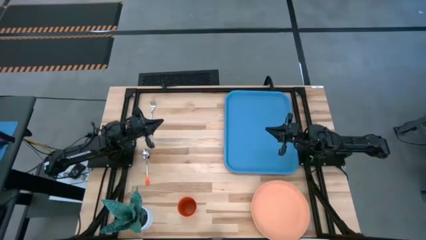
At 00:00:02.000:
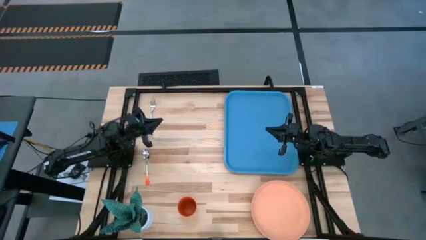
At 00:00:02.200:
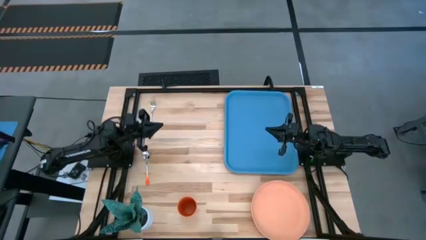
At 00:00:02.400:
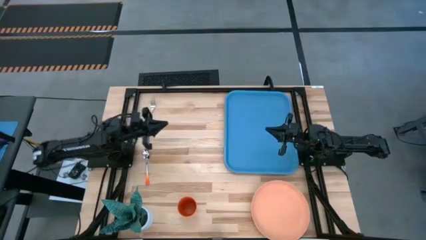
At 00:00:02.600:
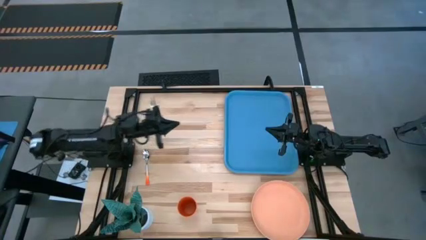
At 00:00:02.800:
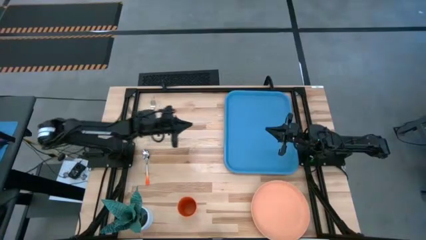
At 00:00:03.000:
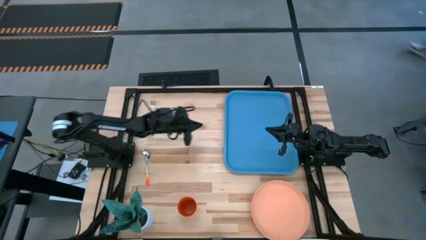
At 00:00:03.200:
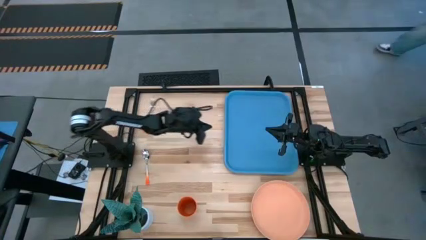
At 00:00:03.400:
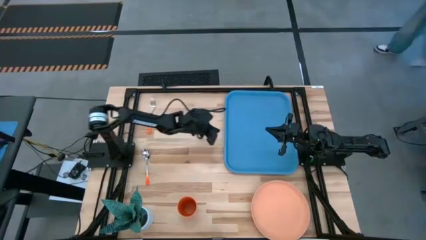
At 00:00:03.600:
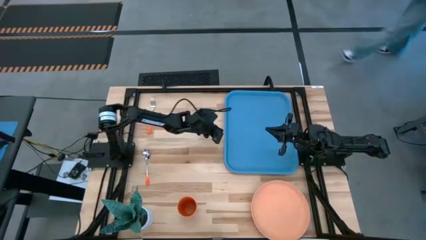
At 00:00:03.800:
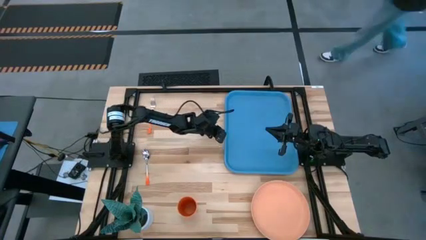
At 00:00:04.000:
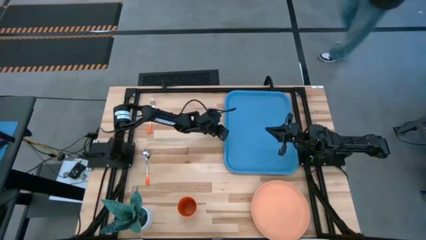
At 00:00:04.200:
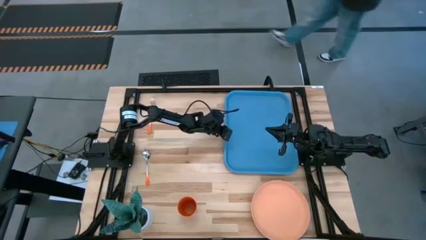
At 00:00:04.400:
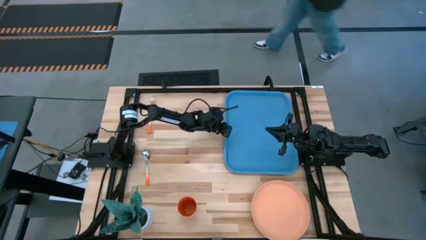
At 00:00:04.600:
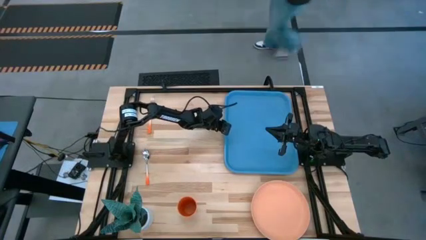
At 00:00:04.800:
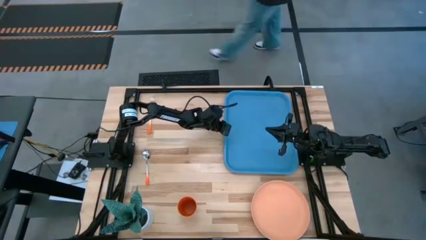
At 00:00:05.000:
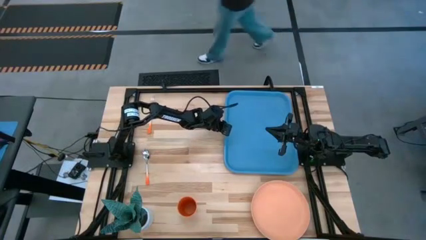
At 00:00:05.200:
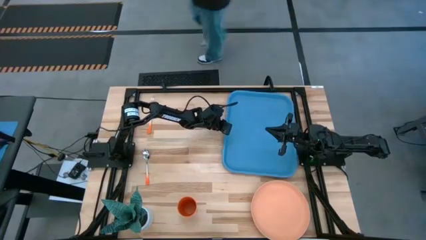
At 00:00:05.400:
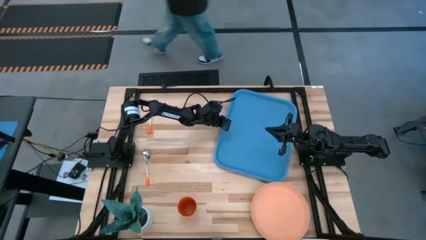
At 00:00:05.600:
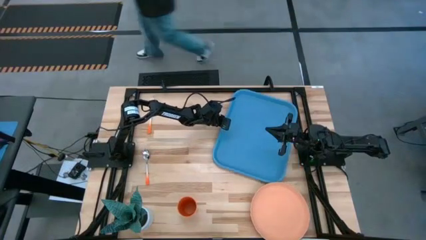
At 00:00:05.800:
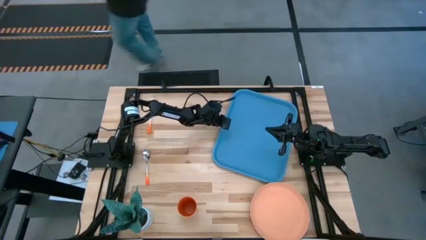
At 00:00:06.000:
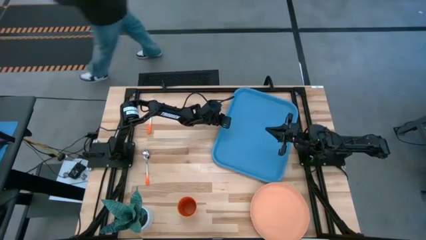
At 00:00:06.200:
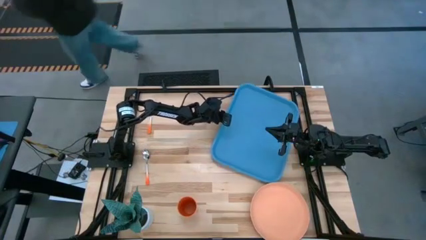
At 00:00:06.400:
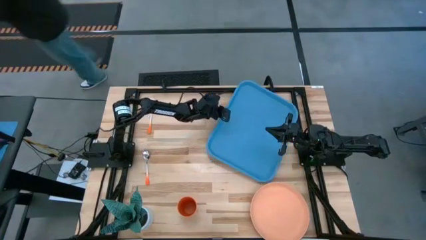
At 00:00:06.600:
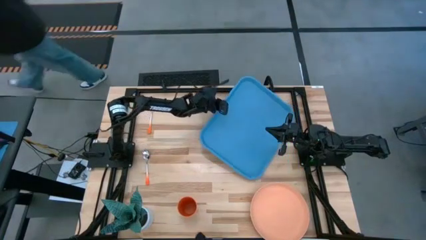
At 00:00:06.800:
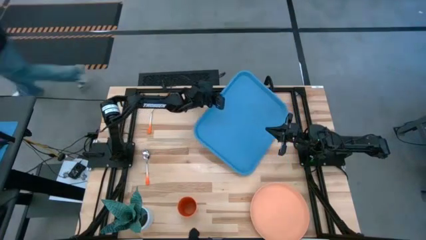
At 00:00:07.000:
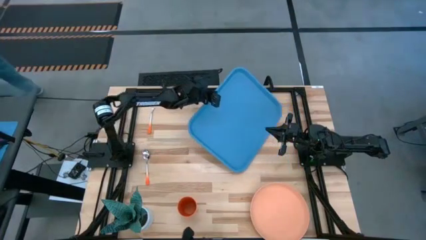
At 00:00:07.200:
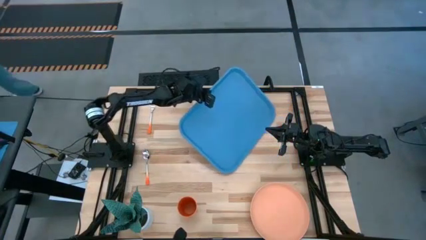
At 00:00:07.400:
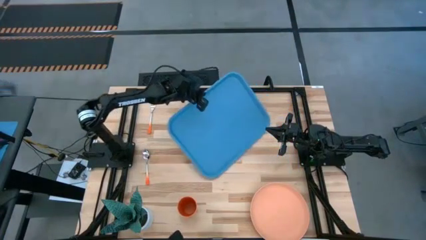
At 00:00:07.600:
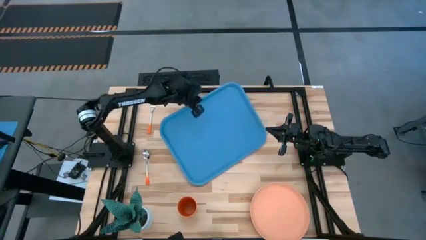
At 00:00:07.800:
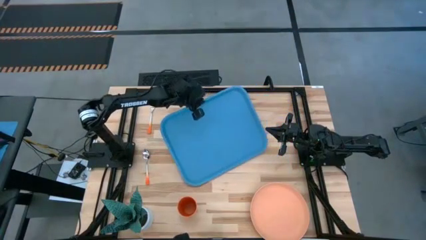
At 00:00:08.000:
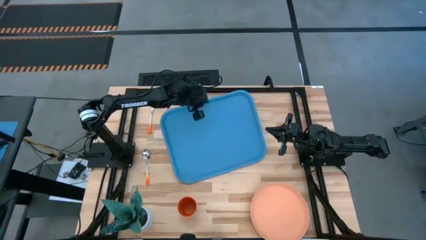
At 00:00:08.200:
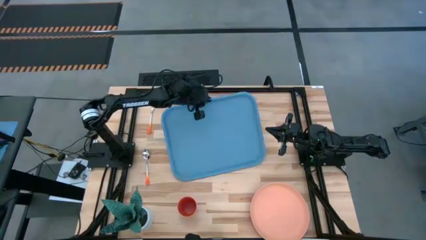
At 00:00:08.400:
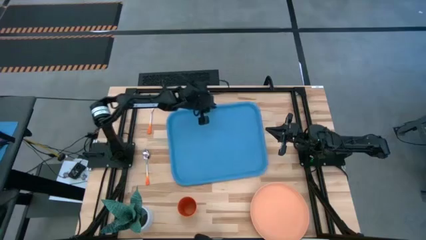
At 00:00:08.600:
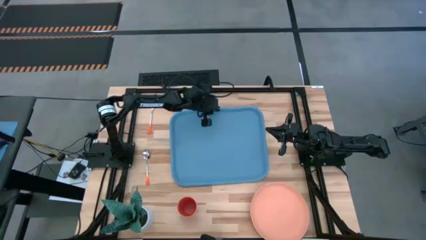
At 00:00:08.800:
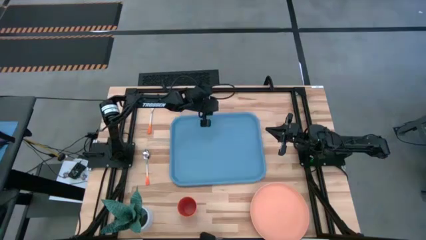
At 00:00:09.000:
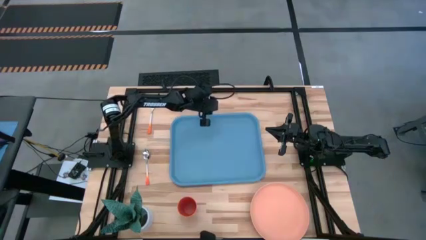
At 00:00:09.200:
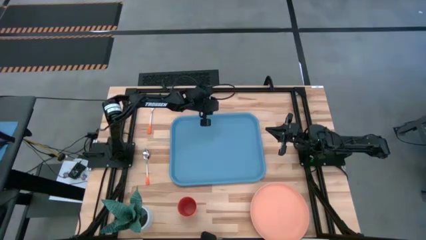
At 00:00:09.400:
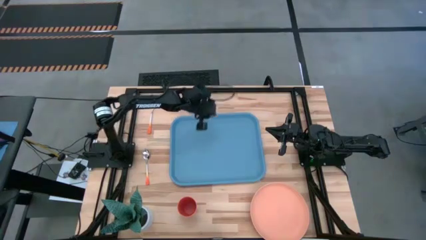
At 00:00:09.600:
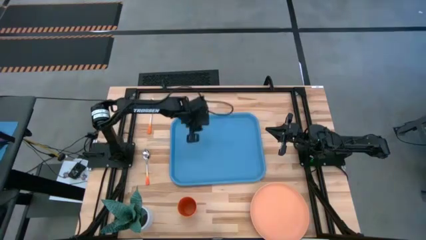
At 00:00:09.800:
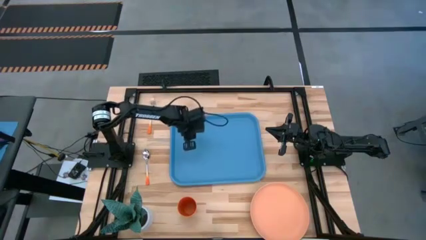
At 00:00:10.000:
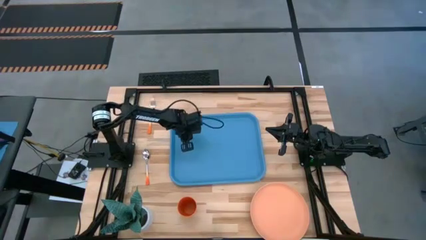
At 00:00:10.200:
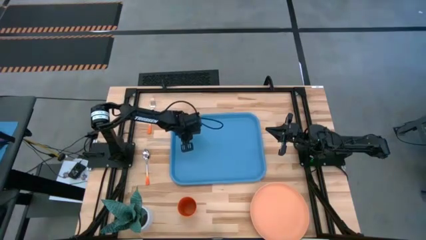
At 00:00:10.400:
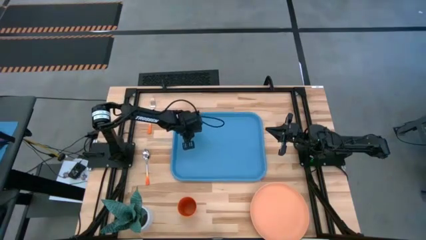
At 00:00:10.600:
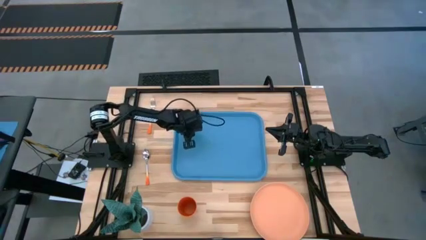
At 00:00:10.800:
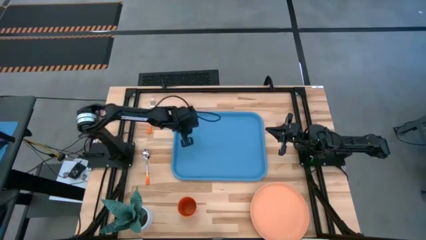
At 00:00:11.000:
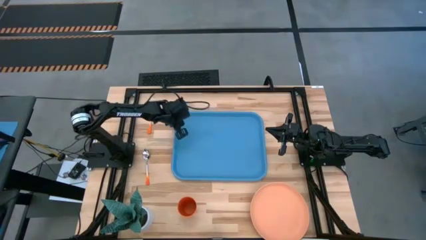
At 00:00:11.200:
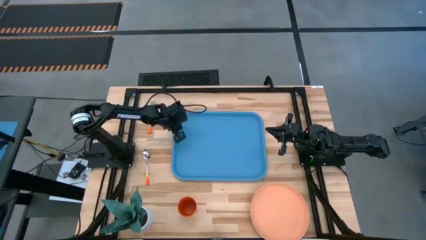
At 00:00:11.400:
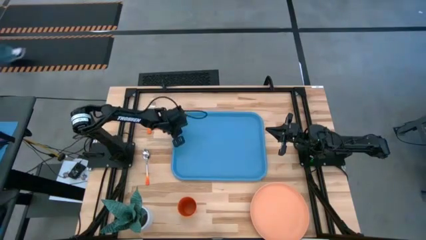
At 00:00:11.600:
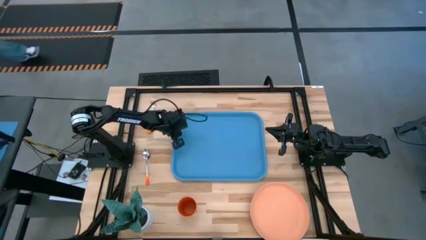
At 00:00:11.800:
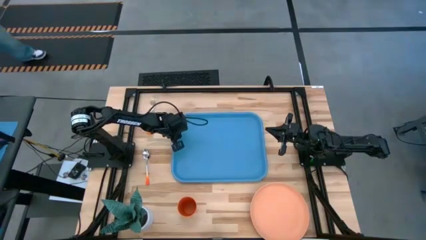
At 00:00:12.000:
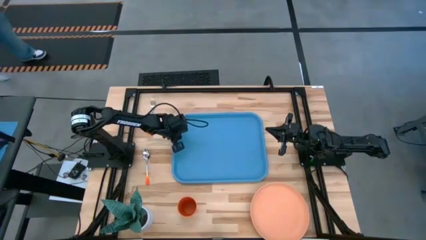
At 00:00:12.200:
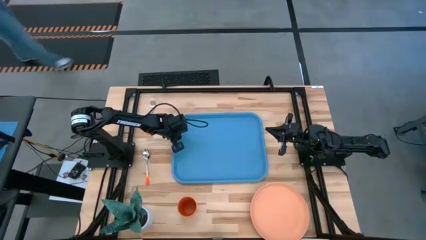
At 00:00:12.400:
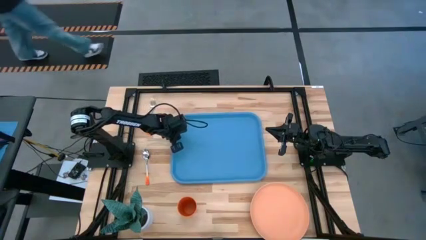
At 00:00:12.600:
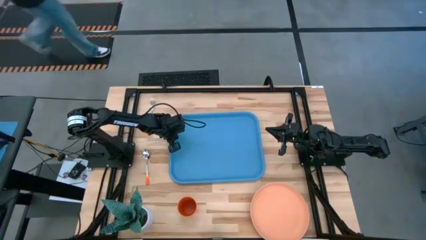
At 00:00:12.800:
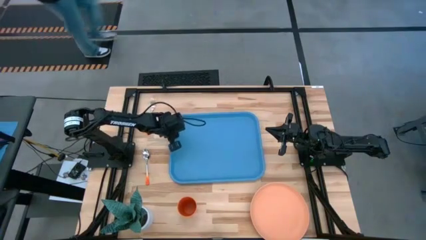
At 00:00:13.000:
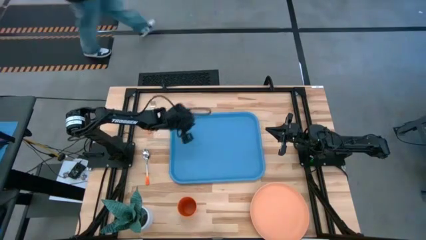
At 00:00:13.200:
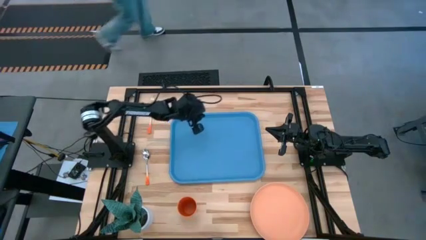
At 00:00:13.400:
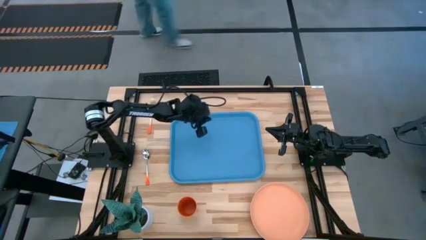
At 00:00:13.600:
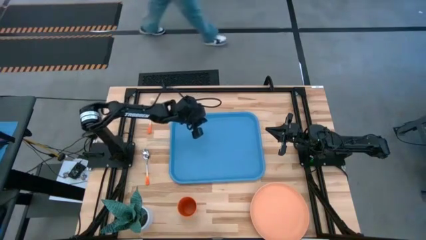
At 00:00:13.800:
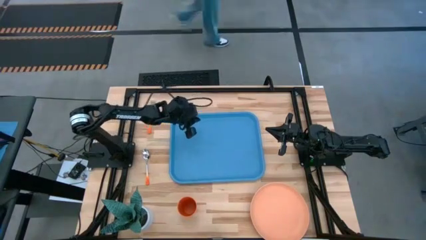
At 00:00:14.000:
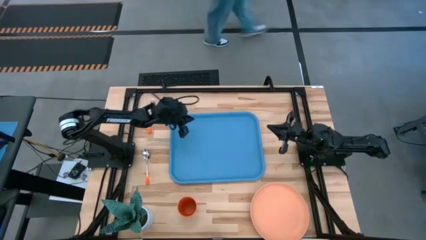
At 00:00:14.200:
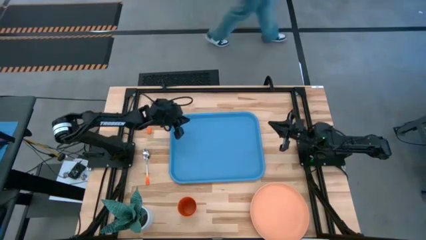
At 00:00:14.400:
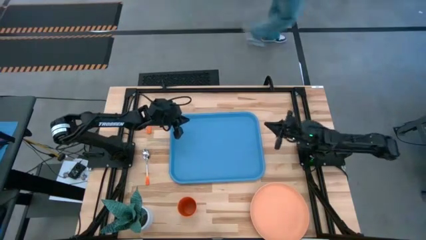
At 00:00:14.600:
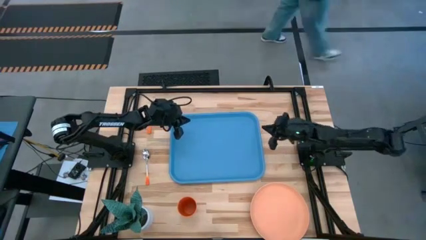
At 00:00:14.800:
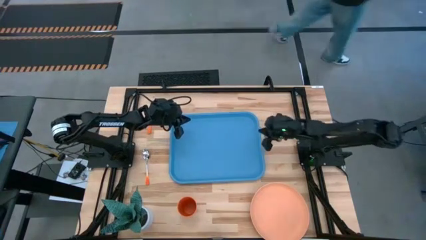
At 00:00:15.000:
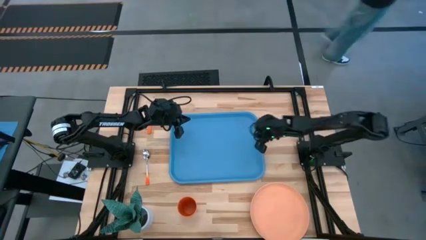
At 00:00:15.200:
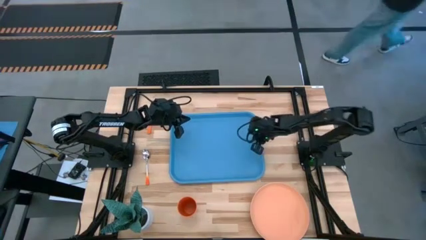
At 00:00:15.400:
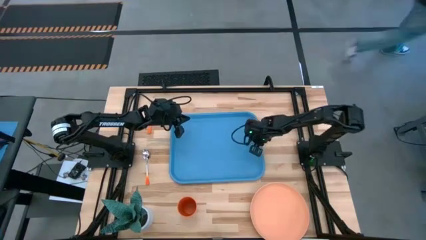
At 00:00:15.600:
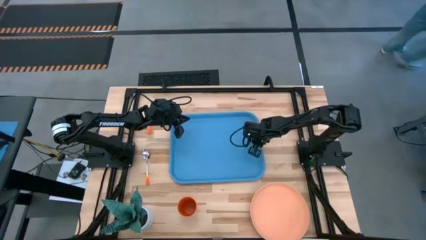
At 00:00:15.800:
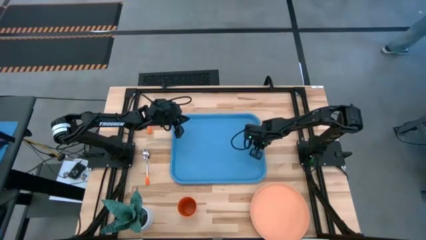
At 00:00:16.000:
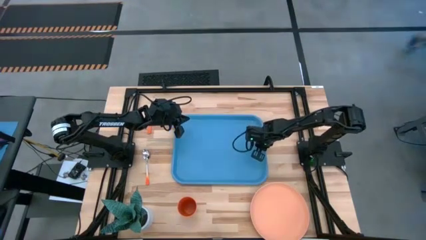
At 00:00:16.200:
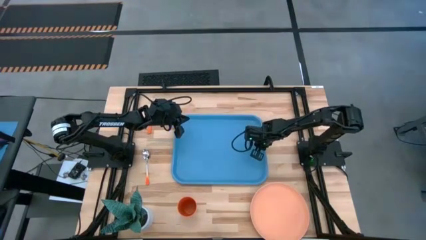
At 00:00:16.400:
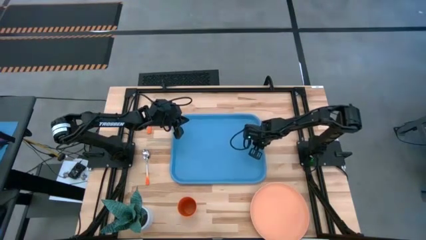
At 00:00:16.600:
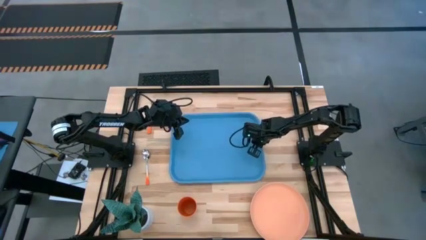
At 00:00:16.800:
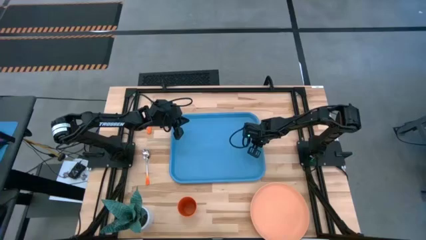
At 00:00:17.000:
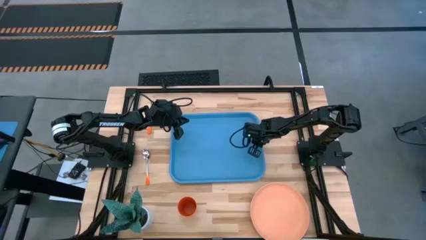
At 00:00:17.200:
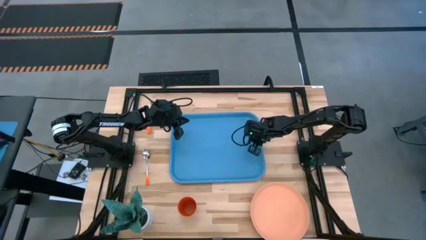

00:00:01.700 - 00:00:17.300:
Task: Pick and place plate/cup/fork/spoon on tray
Move the blue serving tray to the center of the table
